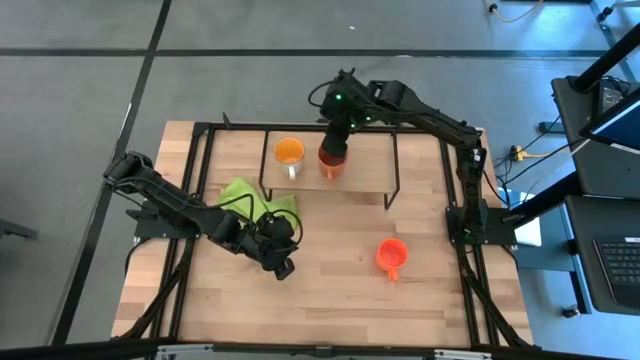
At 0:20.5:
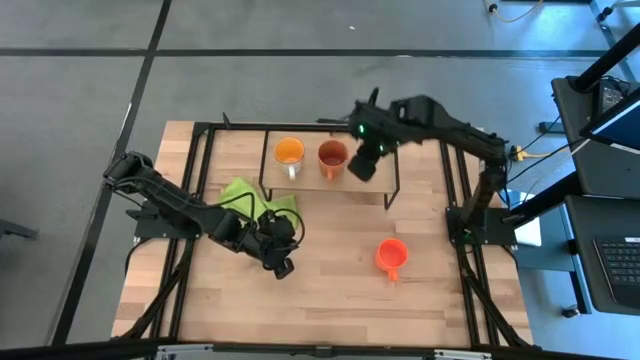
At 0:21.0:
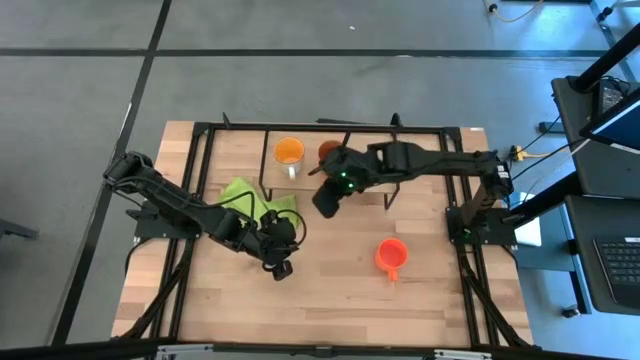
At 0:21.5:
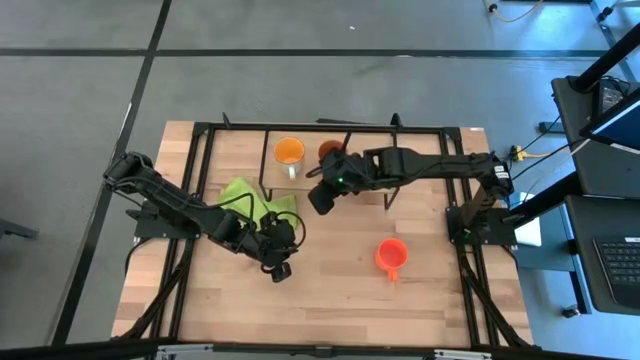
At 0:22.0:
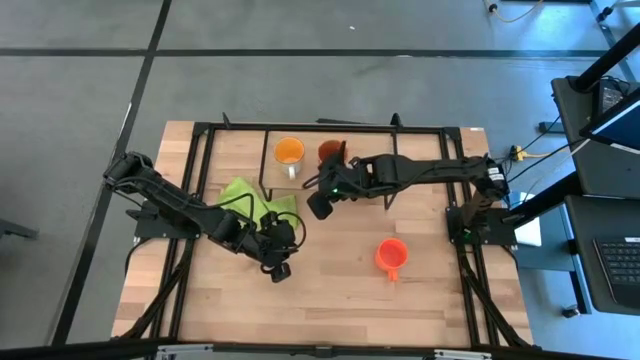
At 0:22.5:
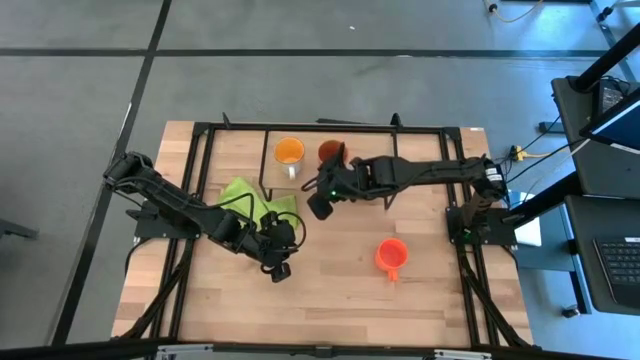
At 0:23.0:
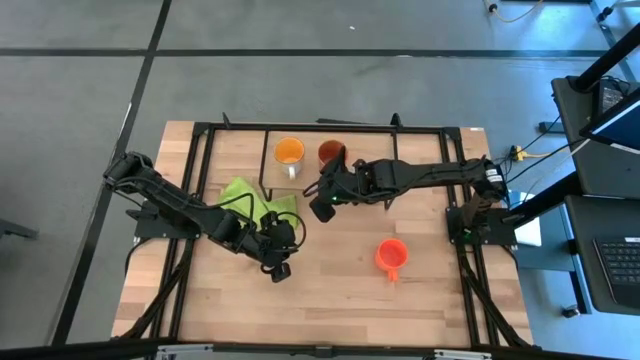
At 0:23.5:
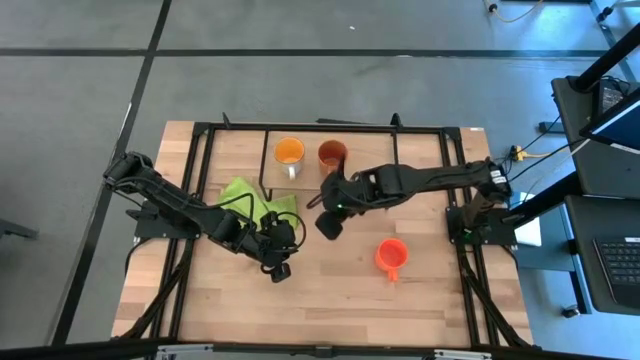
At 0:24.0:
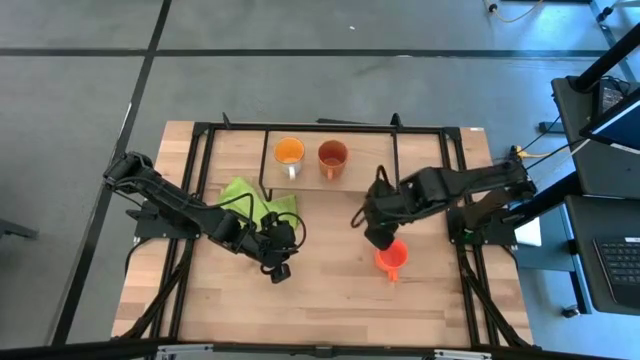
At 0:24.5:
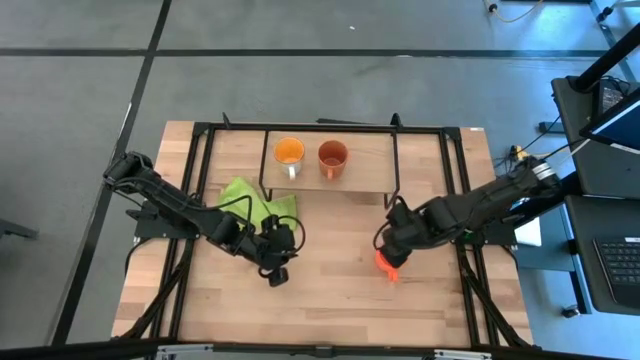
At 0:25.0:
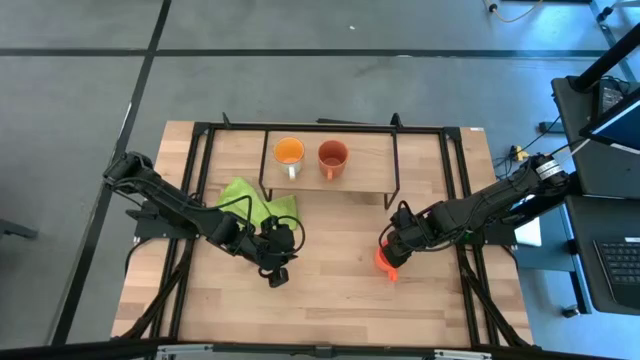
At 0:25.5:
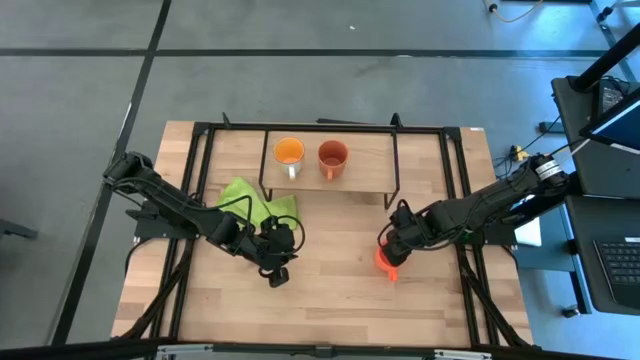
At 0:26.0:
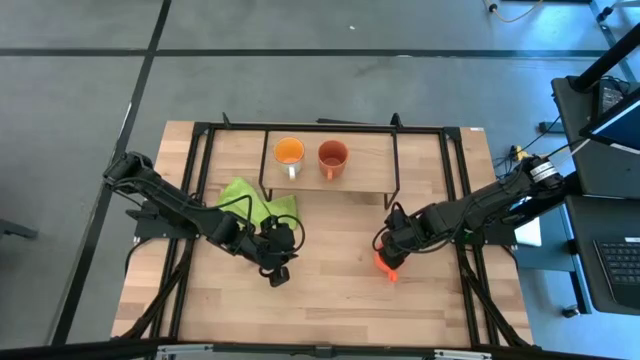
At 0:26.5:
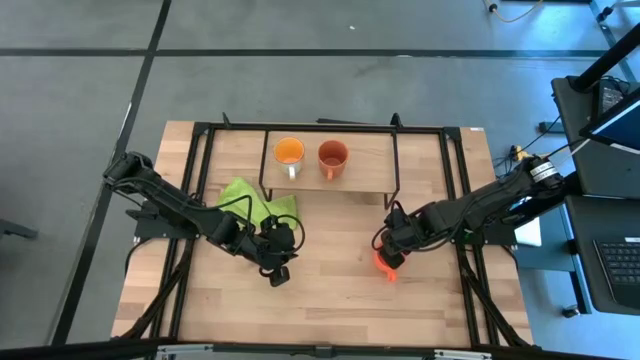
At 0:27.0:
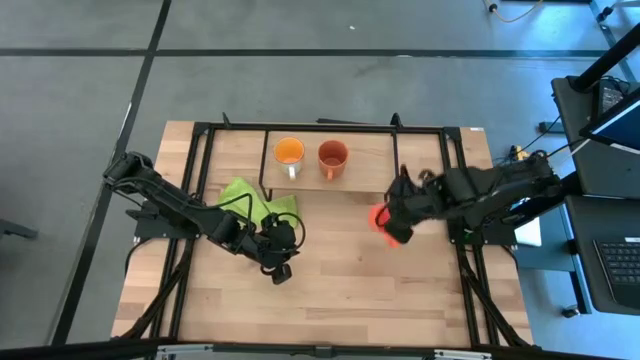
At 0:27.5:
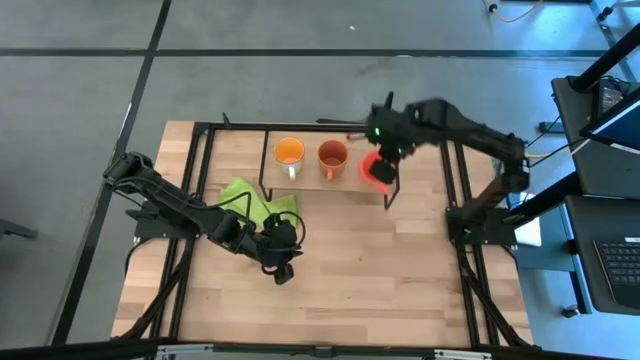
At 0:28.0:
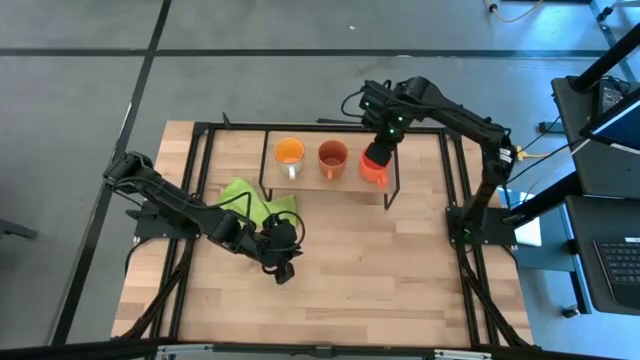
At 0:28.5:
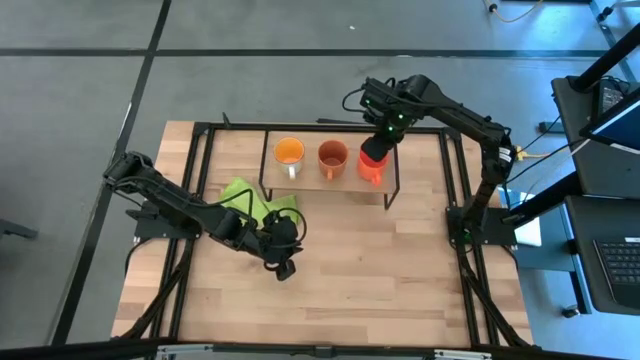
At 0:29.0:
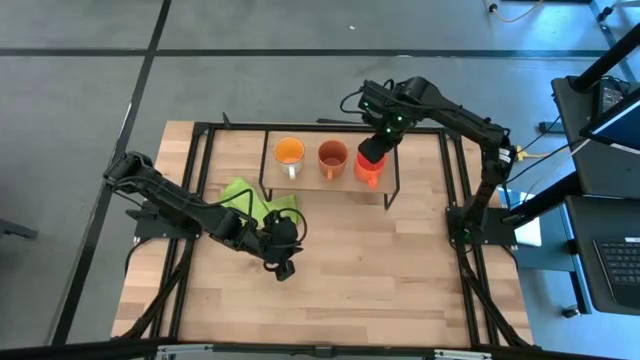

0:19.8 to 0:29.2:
Task: Stack small to large cups/mugs on shelf
Put the orange mug on the shelf

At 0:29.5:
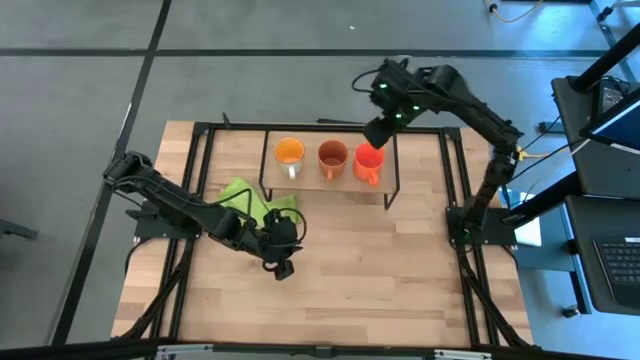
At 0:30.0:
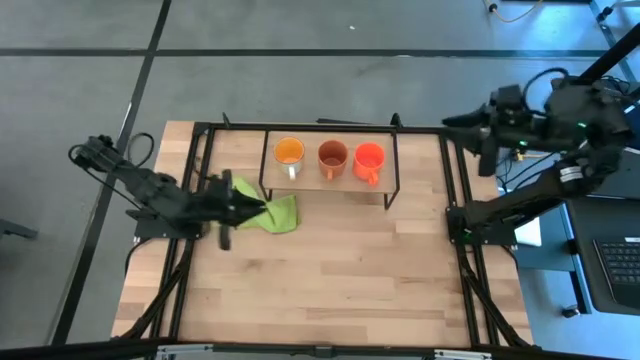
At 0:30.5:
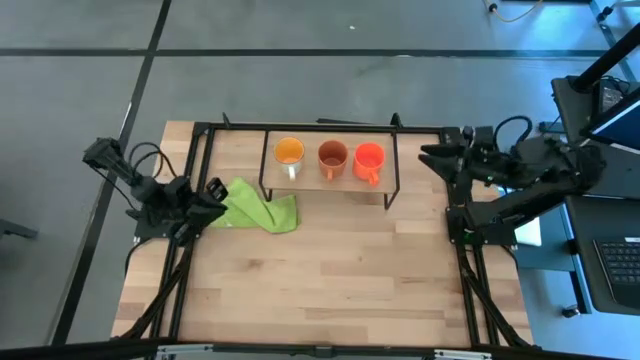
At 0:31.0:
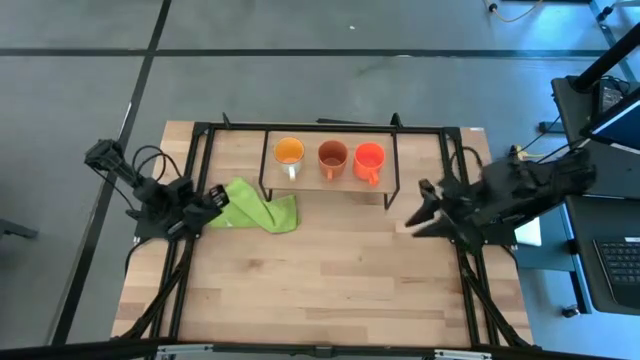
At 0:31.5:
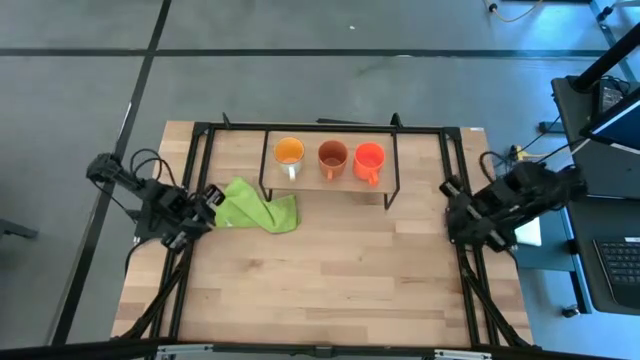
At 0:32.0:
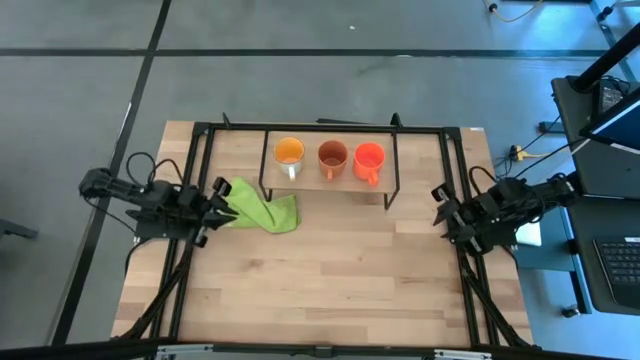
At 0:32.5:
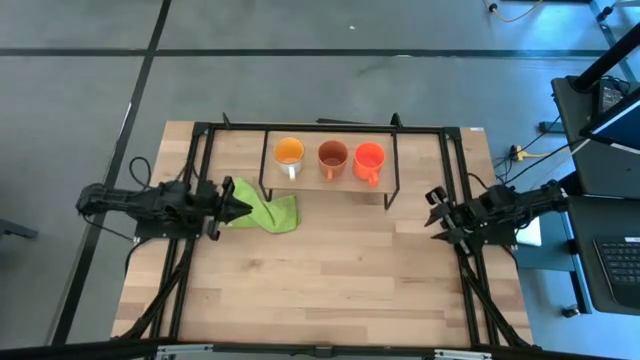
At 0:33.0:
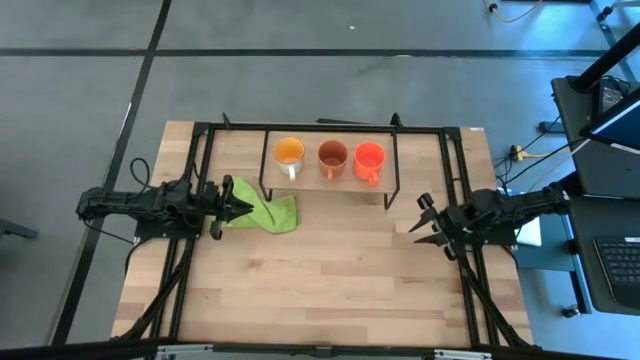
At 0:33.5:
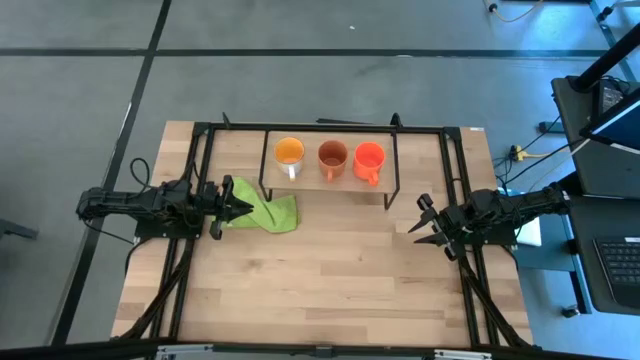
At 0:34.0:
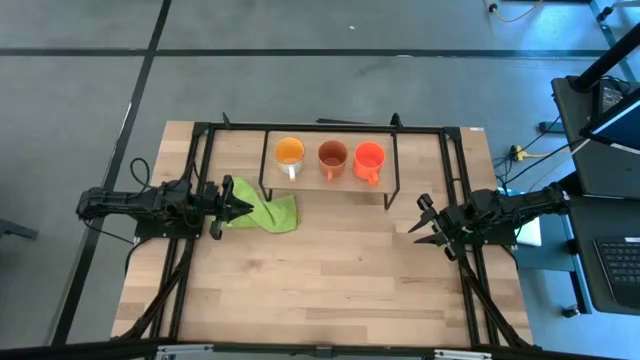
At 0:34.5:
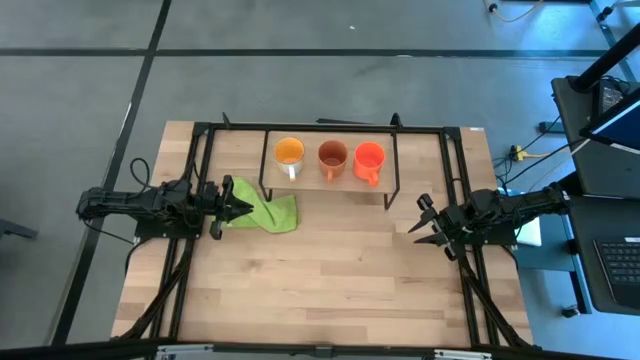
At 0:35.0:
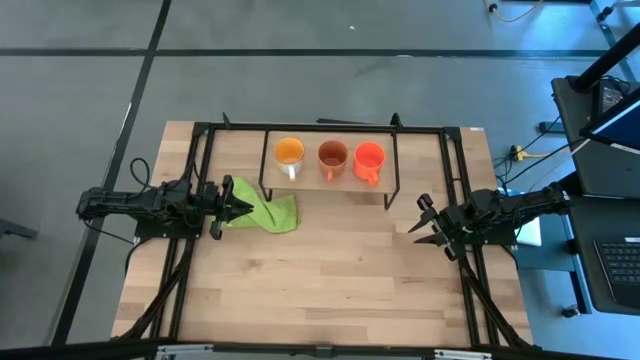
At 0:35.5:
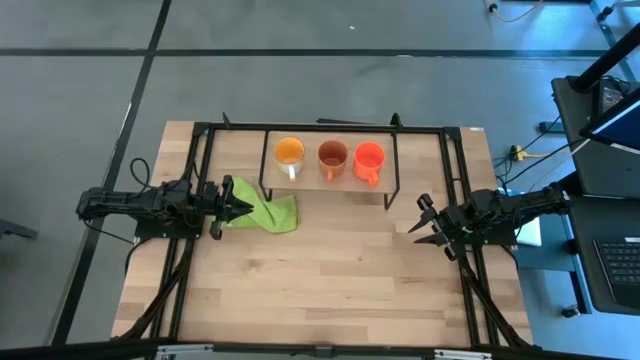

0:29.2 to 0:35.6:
Return to Home Position

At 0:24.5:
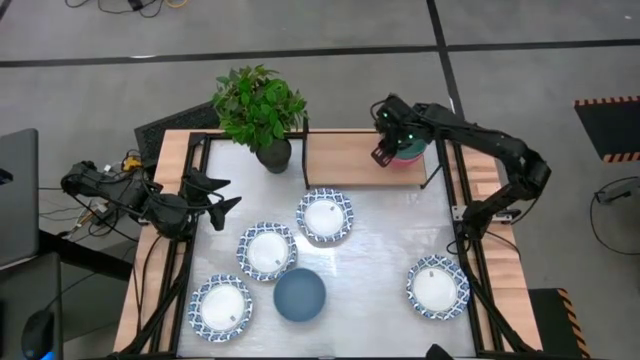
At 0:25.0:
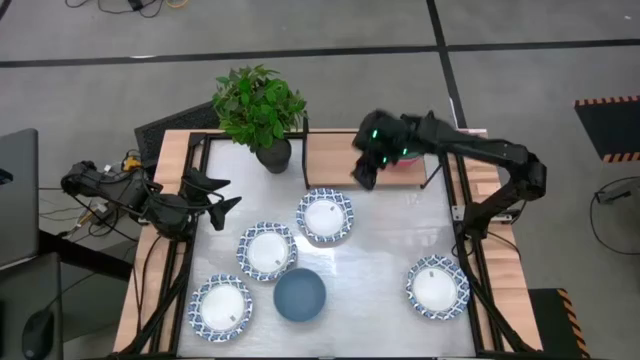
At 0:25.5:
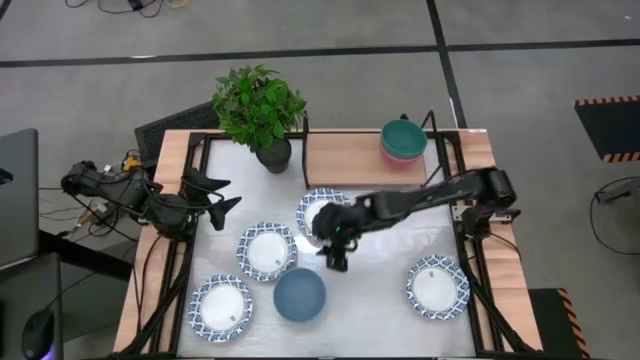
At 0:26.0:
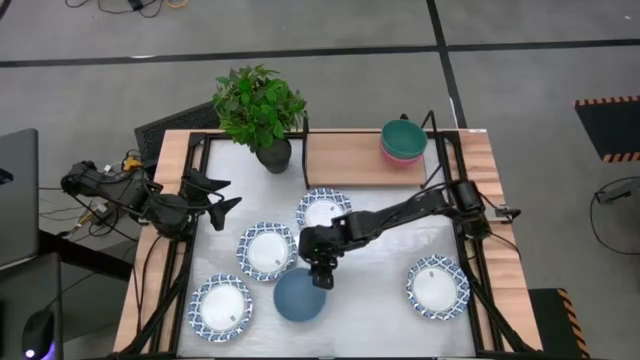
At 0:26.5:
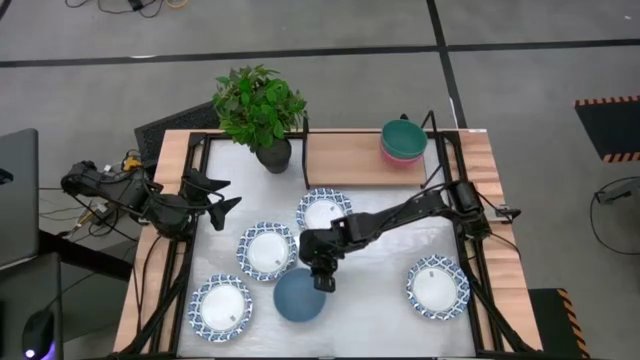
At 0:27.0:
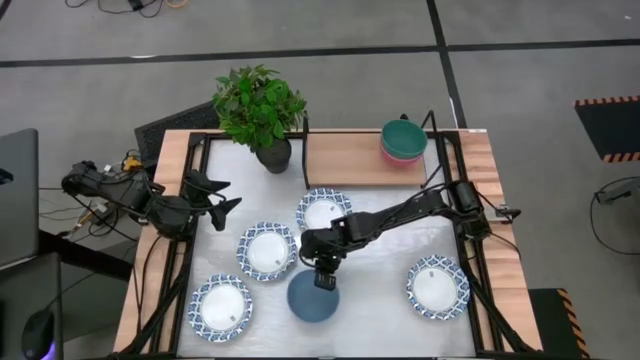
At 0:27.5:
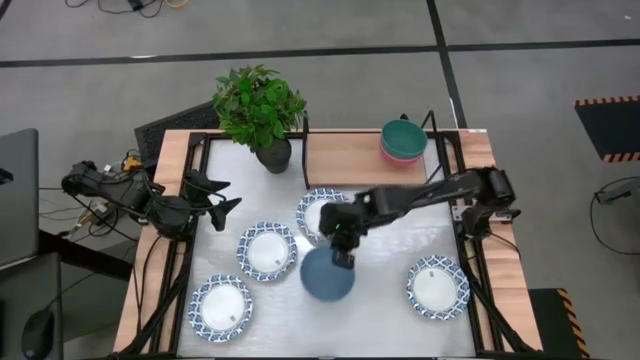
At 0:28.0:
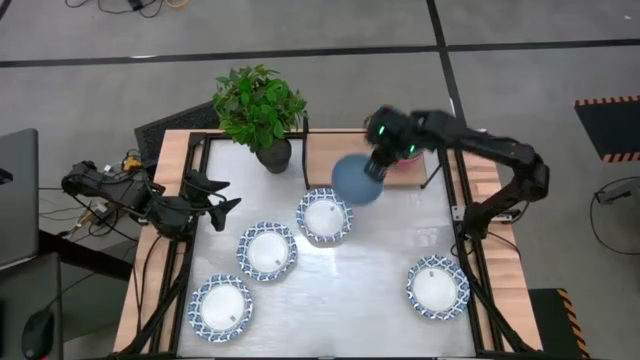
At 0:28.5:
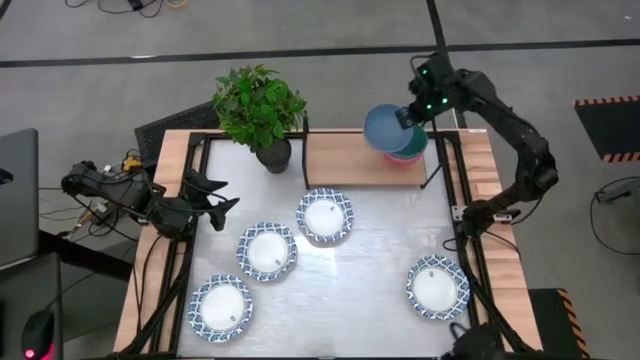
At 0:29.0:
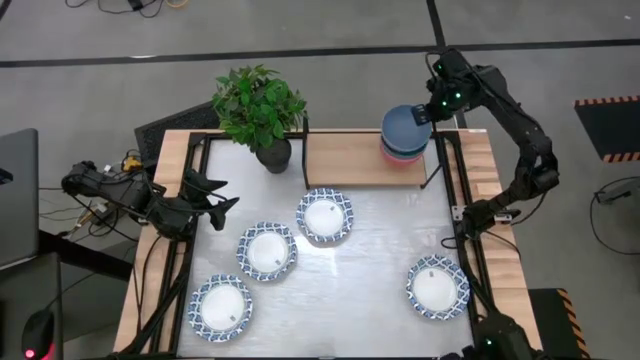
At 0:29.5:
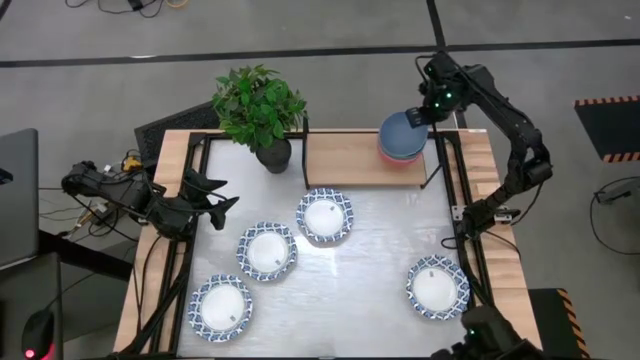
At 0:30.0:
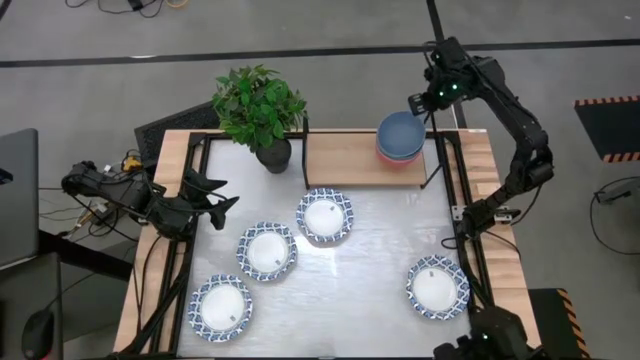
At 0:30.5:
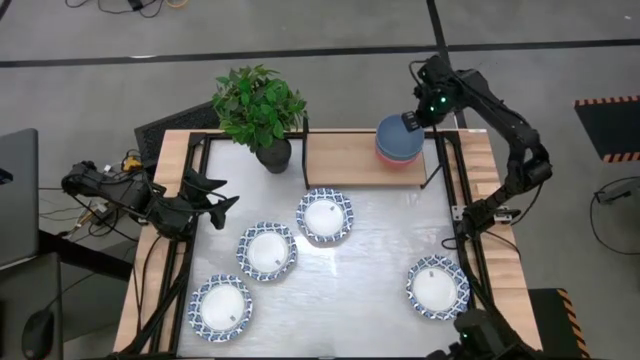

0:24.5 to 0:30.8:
Task: Place and stack bowls onto a shelf
Stack the blue bowl on top of the green bowl on the shelf
